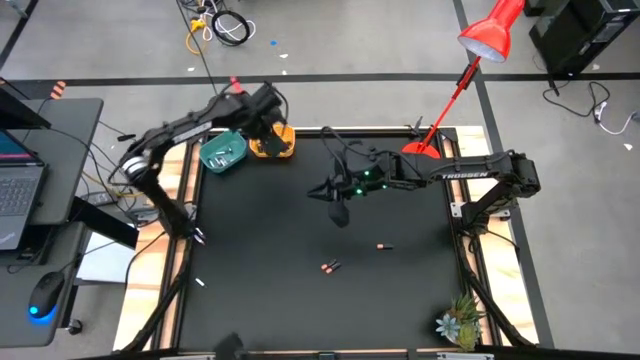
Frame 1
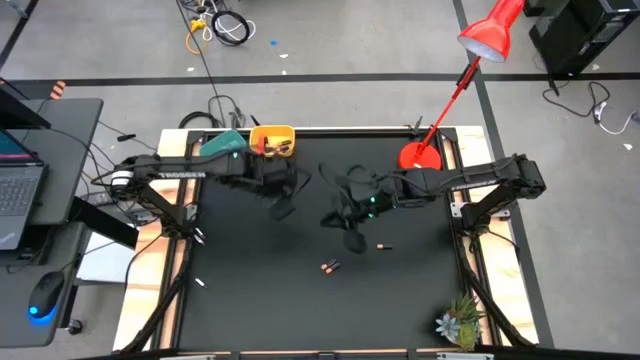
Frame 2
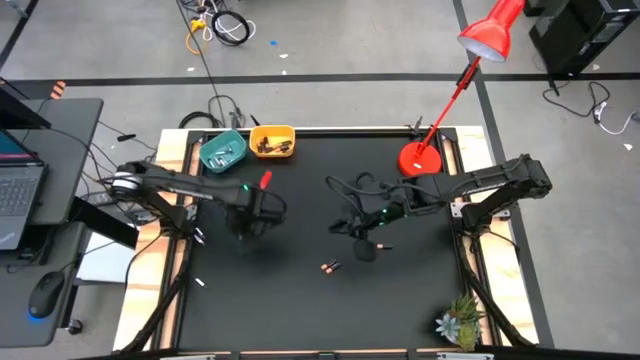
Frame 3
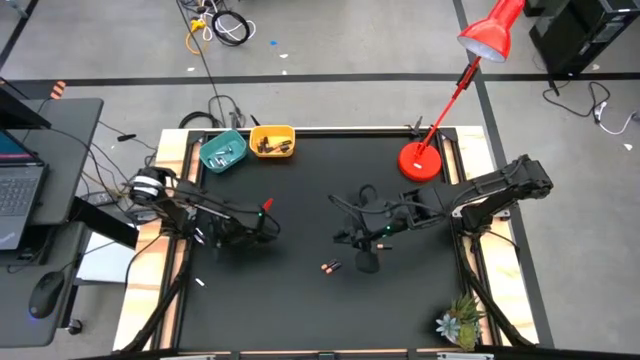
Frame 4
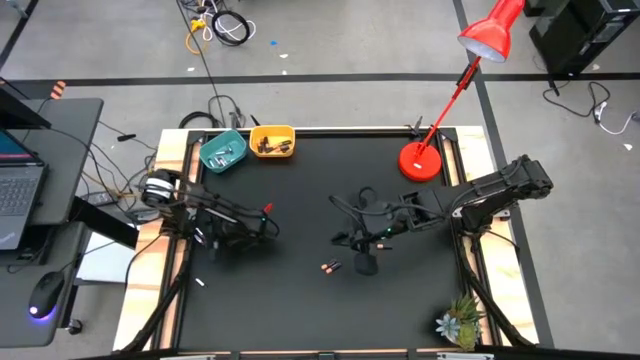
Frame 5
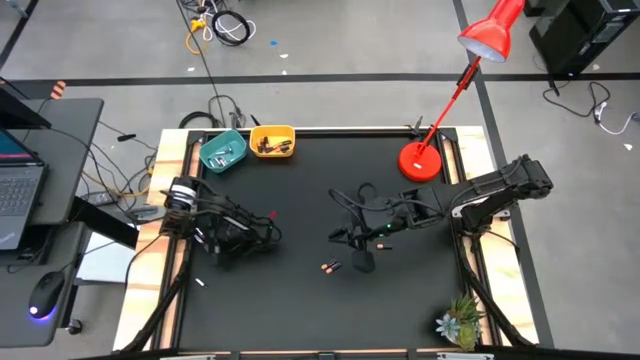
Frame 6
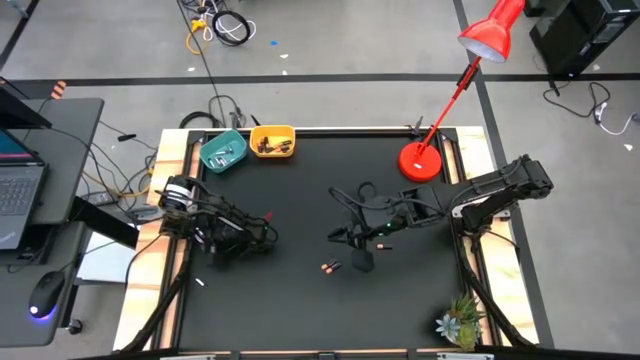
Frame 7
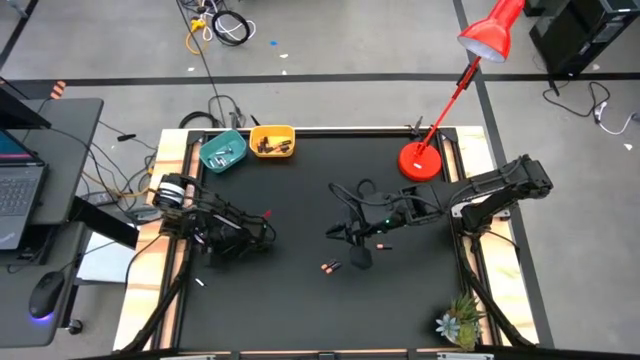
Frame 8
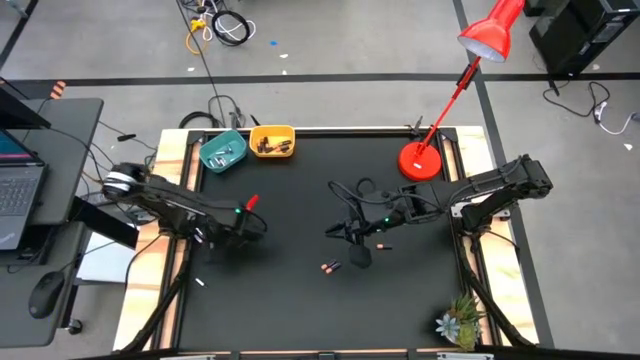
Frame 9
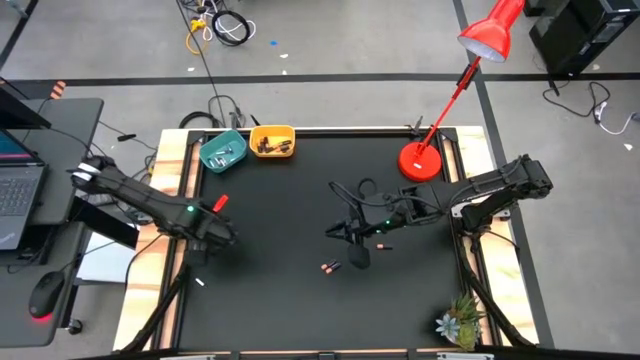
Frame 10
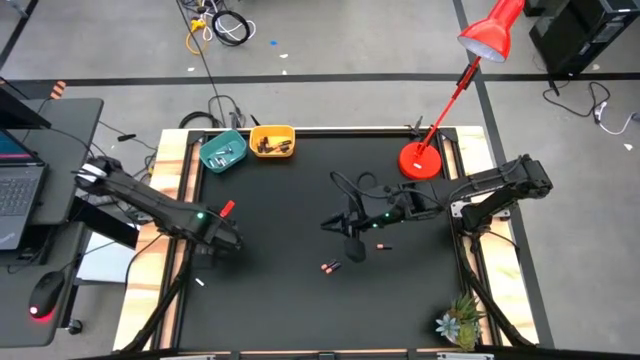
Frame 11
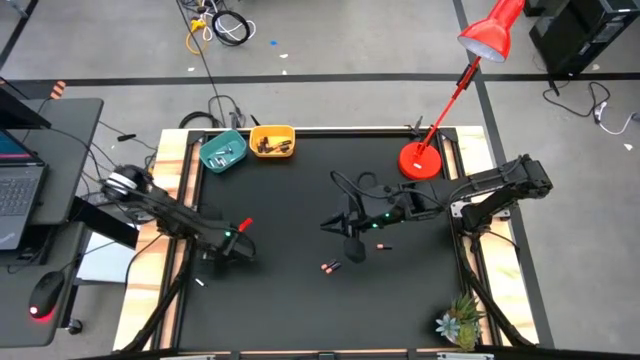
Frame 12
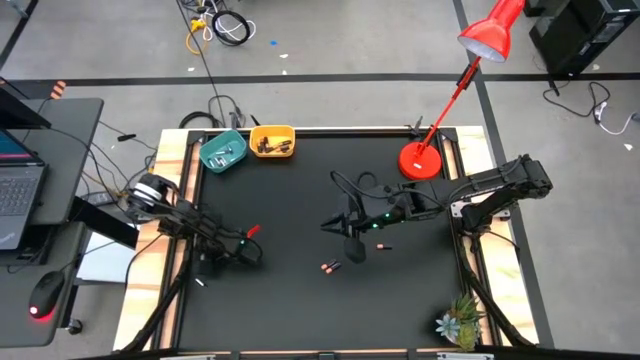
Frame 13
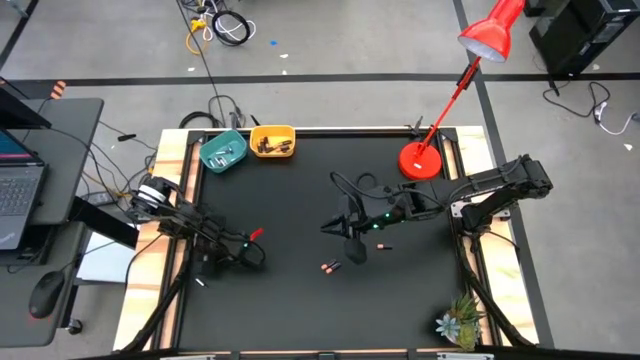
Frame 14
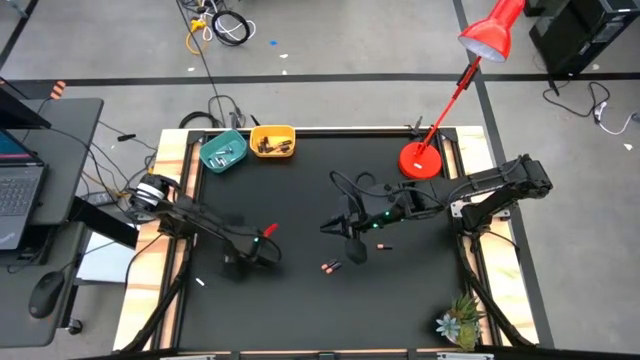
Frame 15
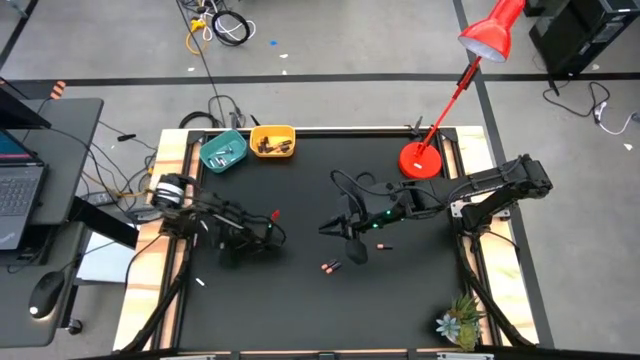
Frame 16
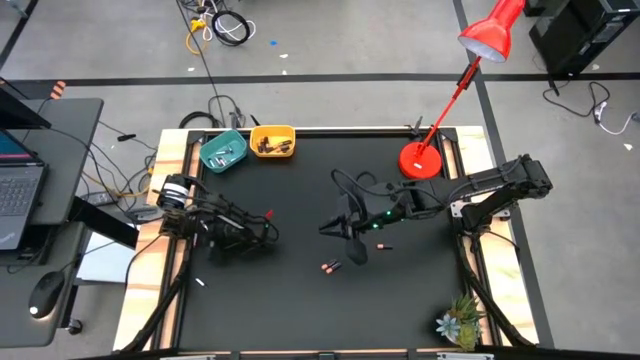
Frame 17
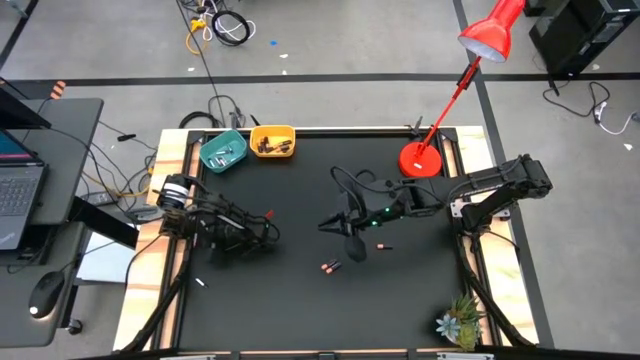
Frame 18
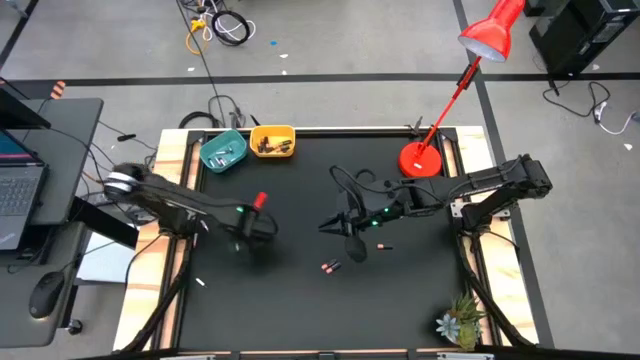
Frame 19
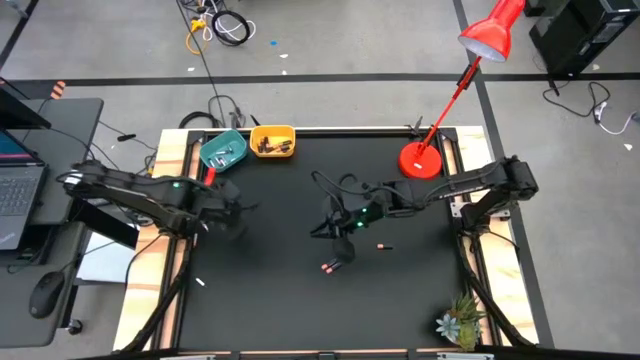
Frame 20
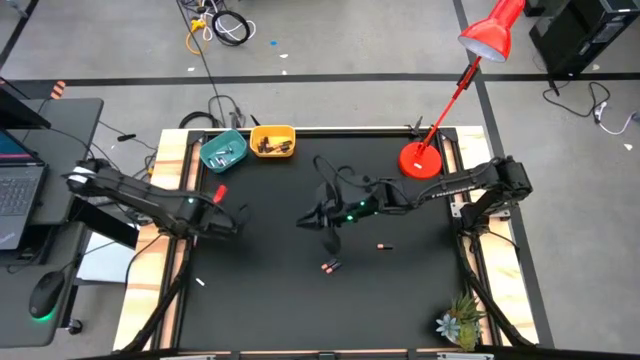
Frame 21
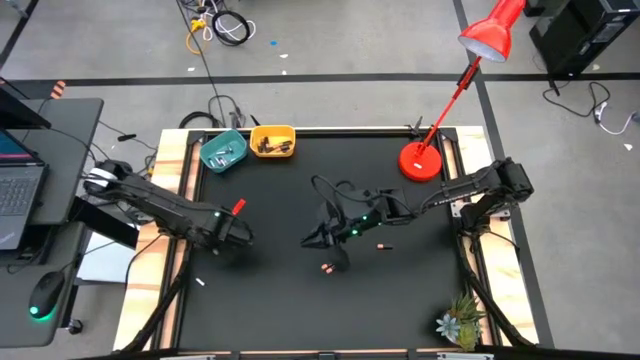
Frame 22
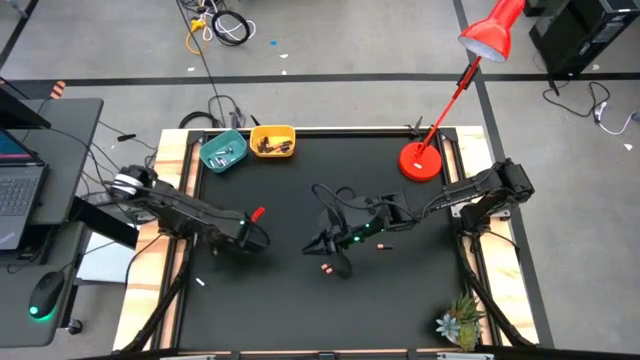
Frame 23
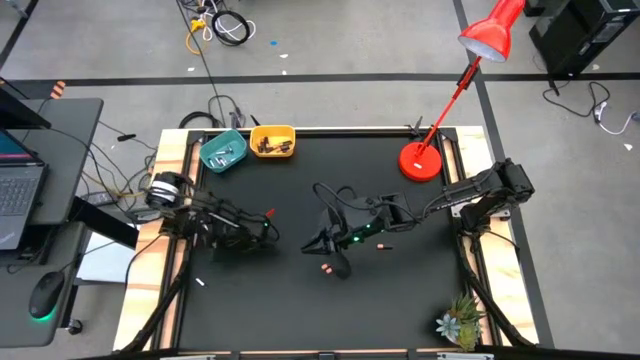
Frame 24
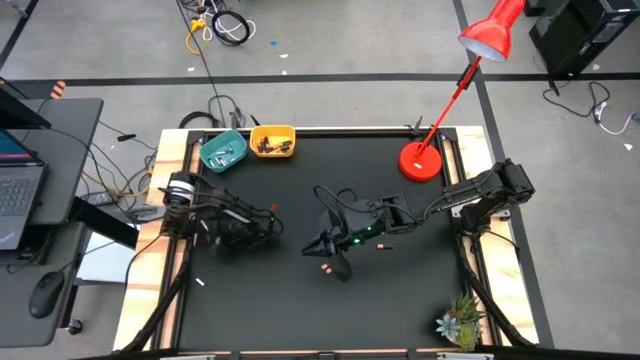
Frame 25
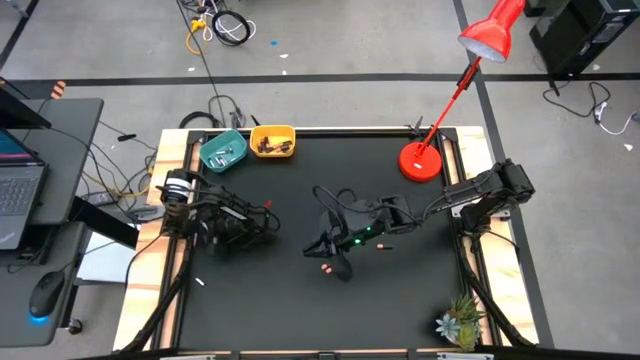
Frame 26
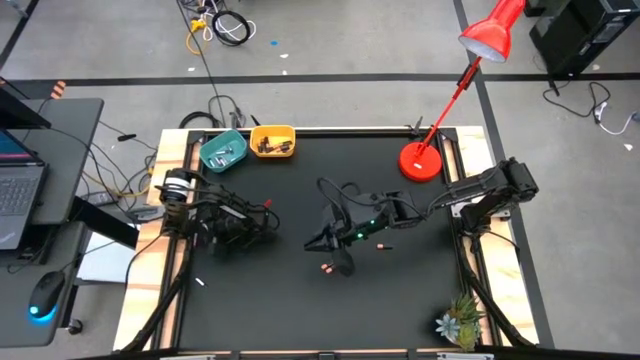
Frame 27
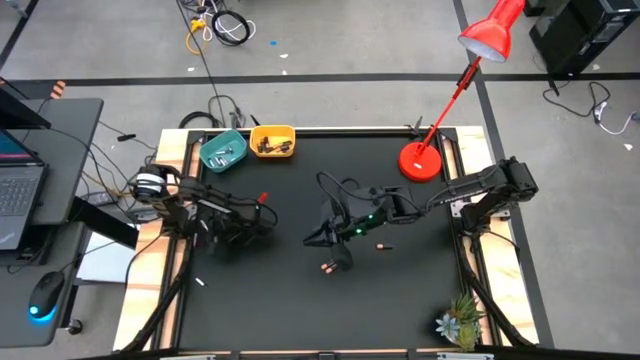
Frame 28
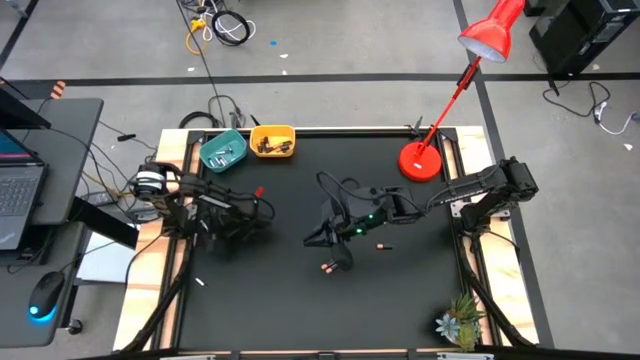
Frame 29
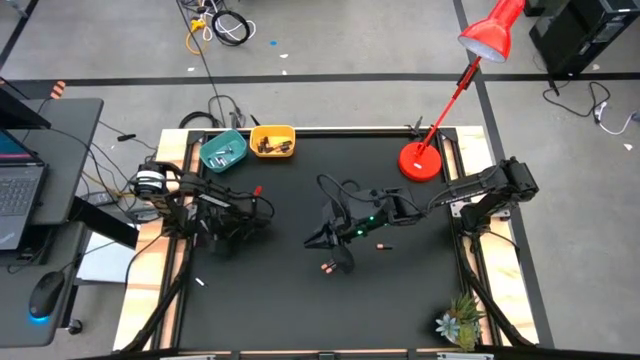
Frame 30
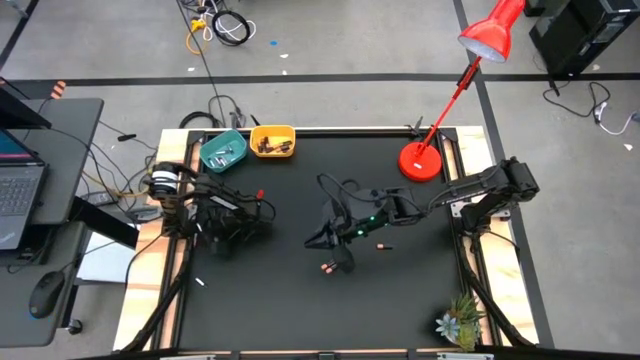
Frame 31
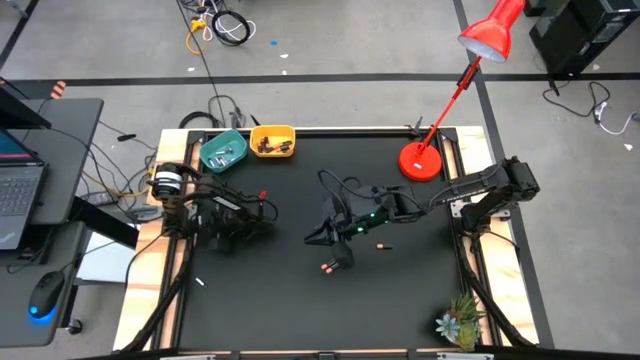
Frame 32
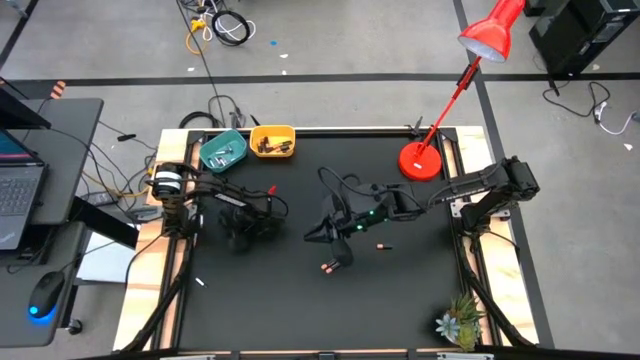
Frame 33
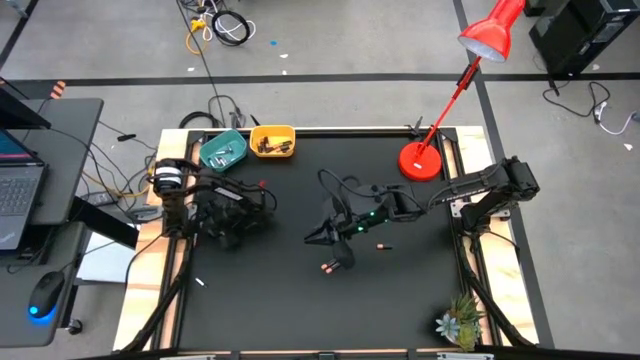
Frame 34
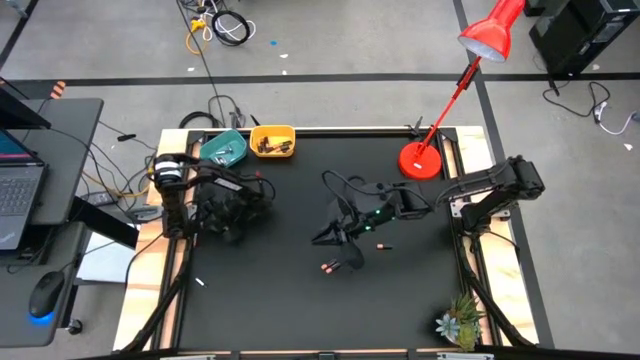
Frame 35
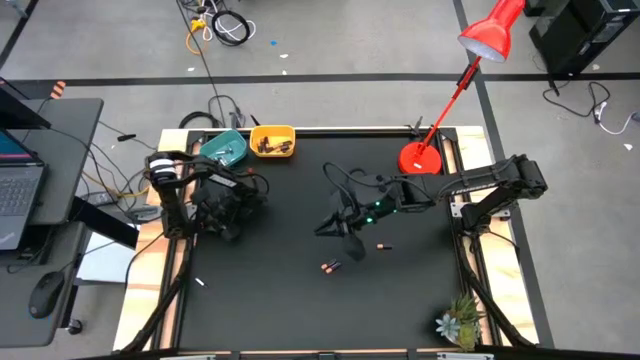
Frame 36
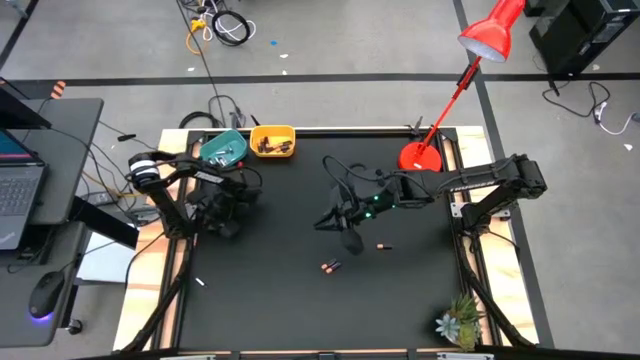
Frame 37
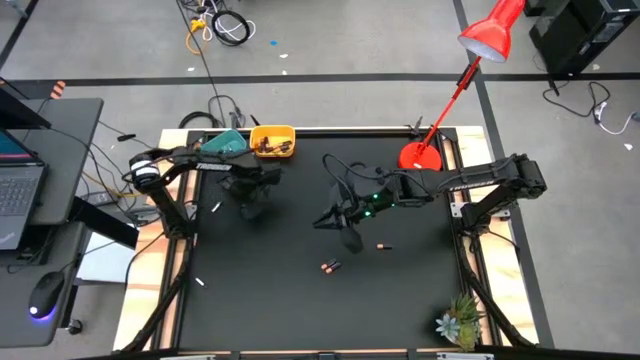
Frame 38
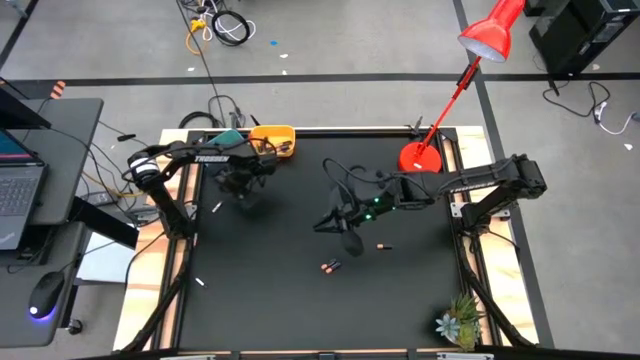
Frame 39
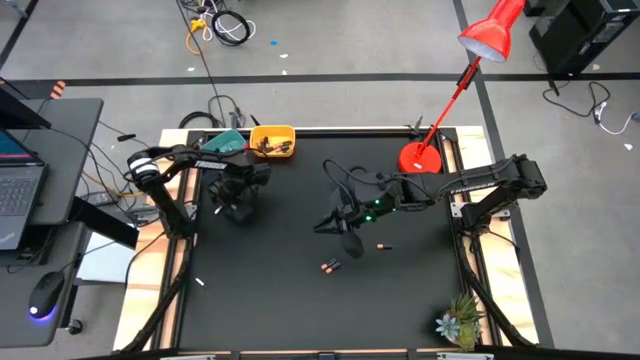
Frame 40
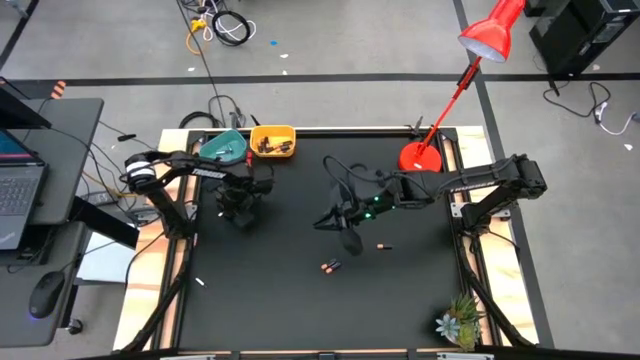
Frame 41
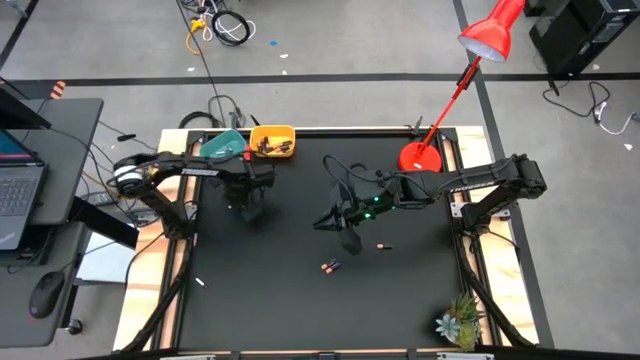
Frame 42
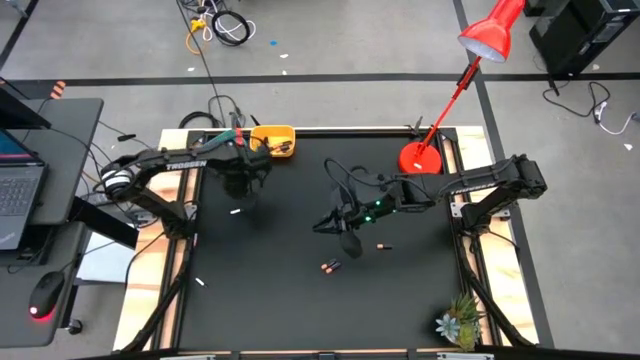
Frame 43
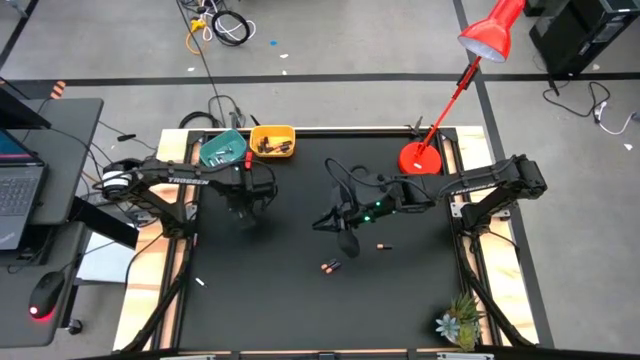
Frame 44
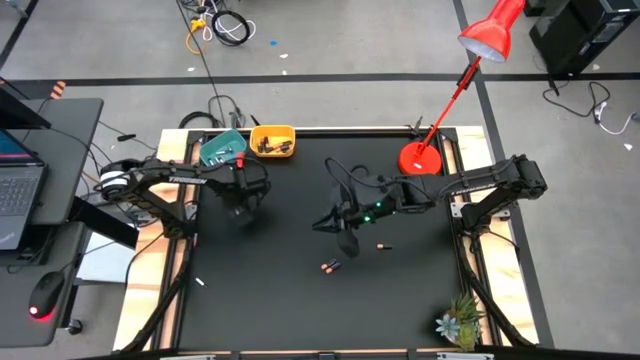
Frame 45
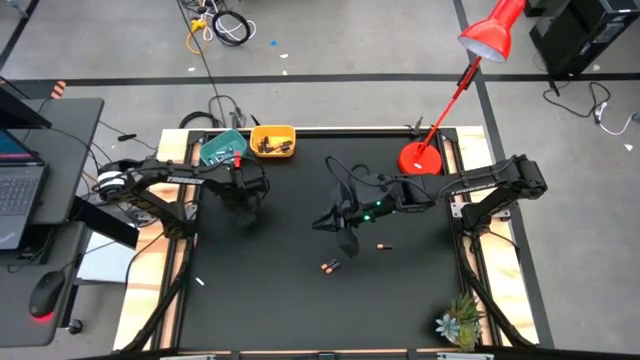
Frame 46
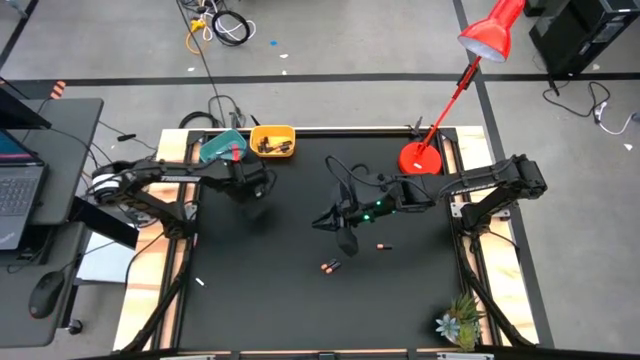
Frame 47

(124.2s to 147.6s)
Task: Sort batteries
Put the top silver battery into the blue bin
